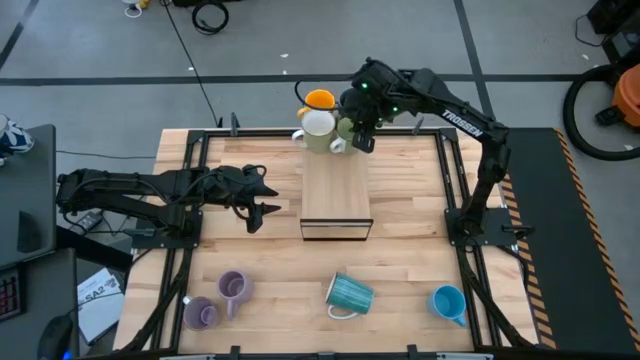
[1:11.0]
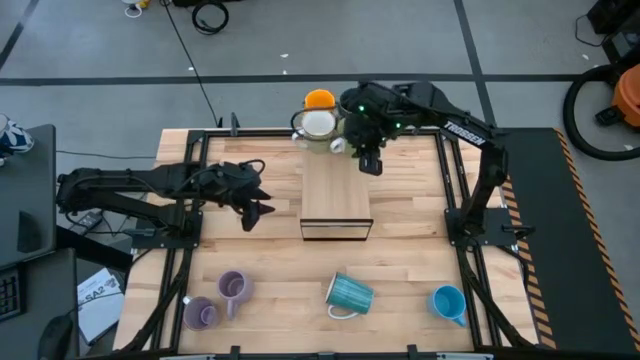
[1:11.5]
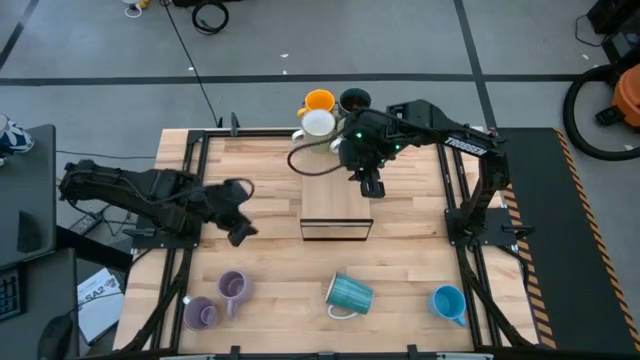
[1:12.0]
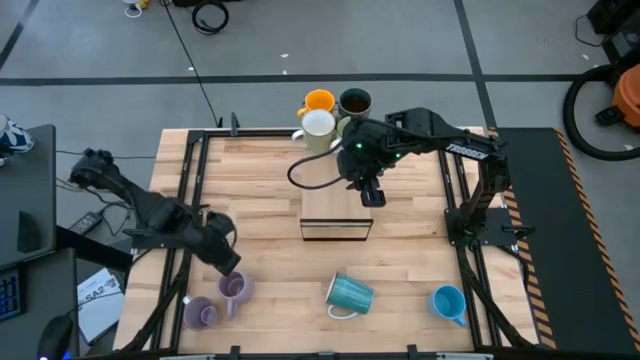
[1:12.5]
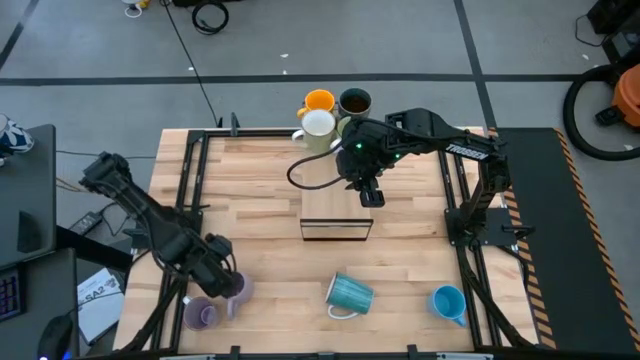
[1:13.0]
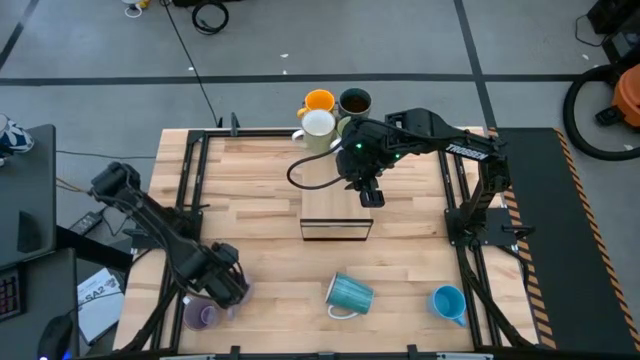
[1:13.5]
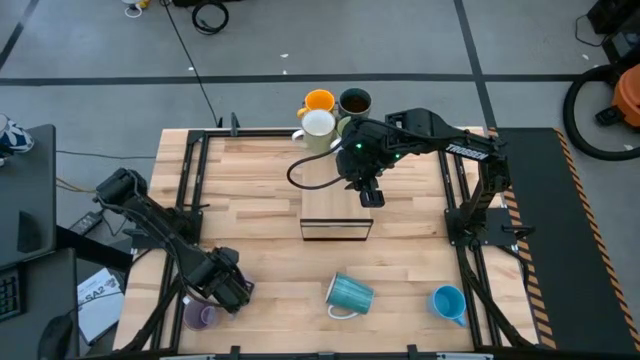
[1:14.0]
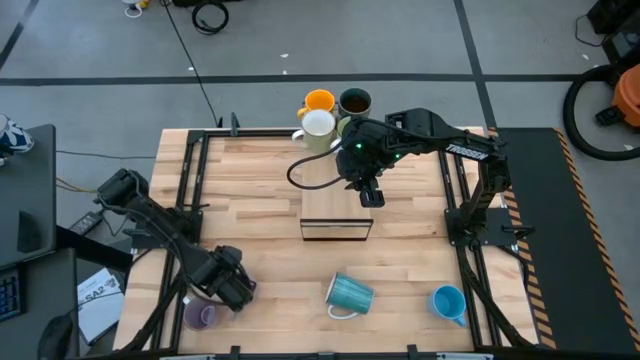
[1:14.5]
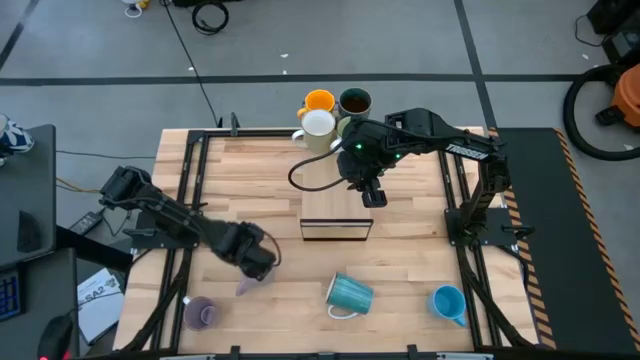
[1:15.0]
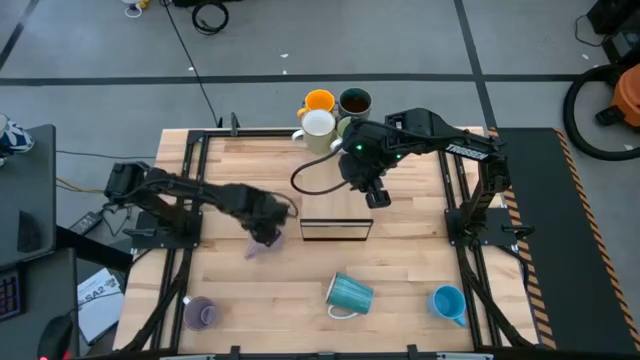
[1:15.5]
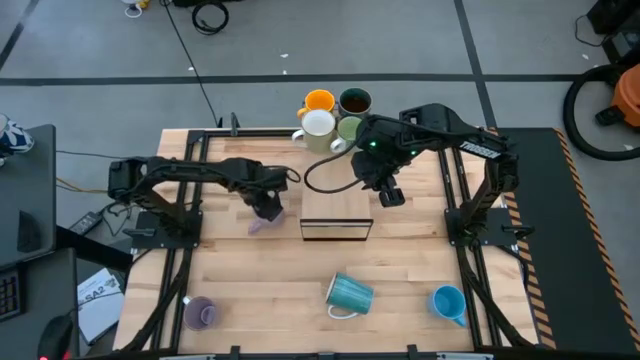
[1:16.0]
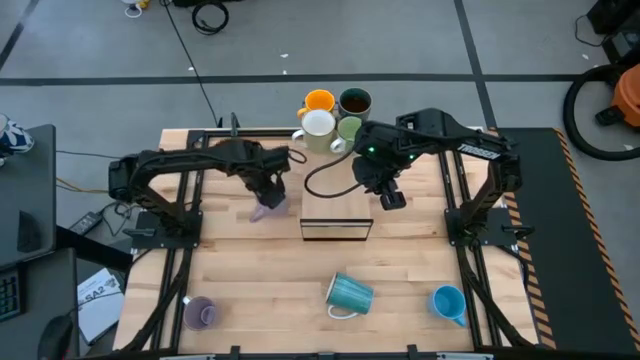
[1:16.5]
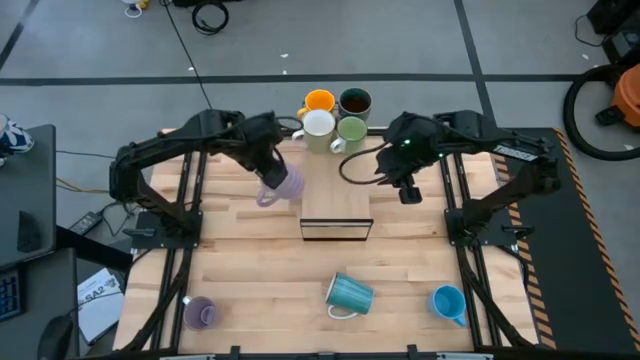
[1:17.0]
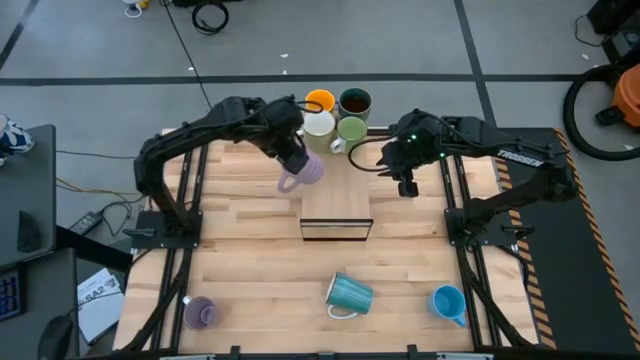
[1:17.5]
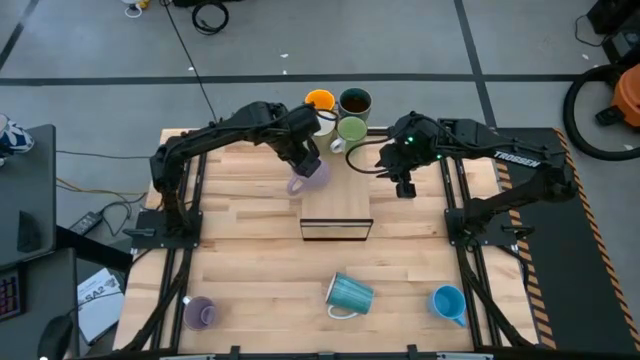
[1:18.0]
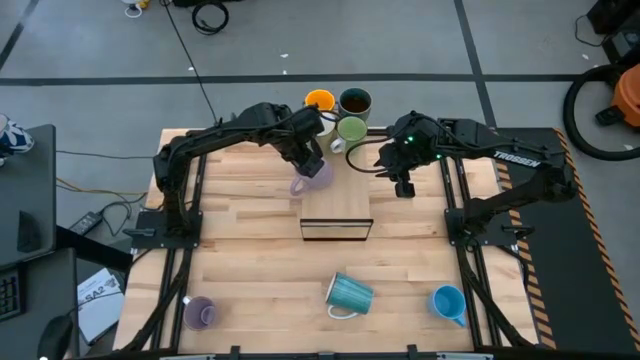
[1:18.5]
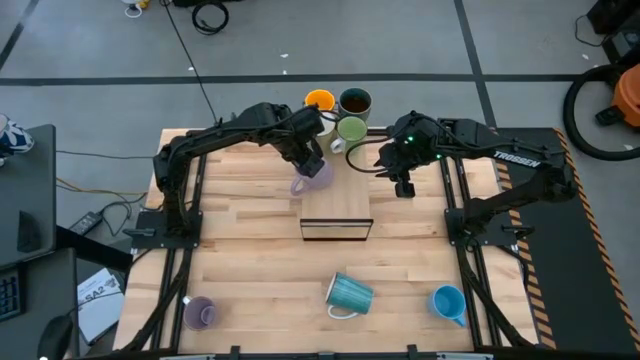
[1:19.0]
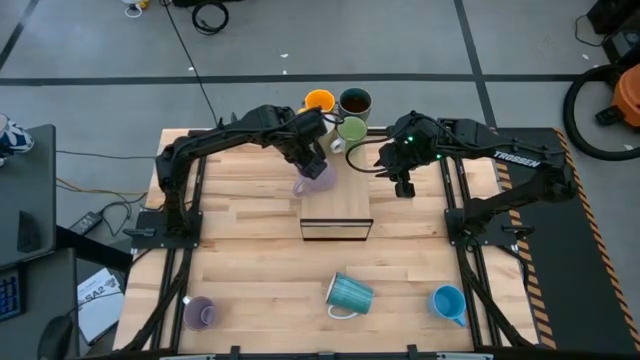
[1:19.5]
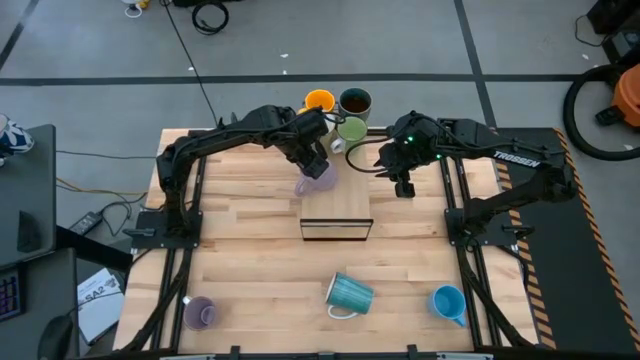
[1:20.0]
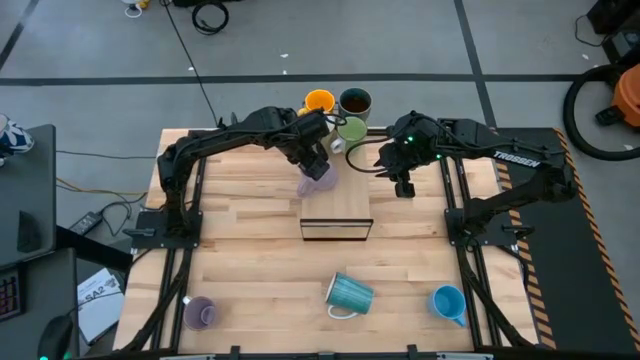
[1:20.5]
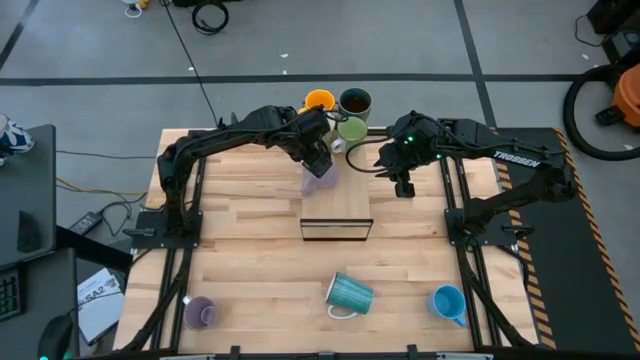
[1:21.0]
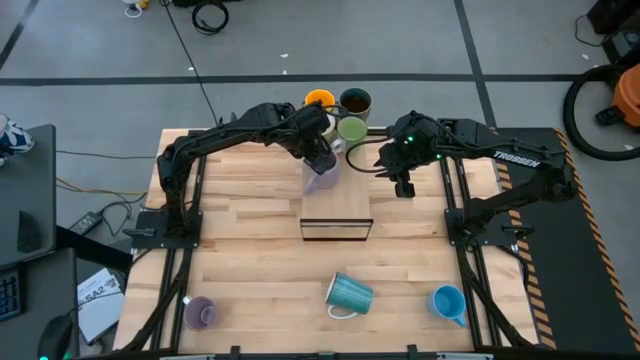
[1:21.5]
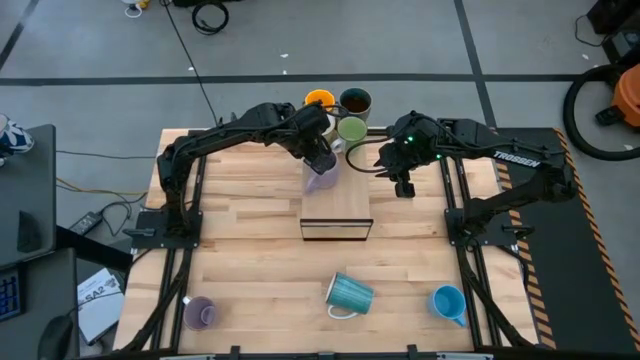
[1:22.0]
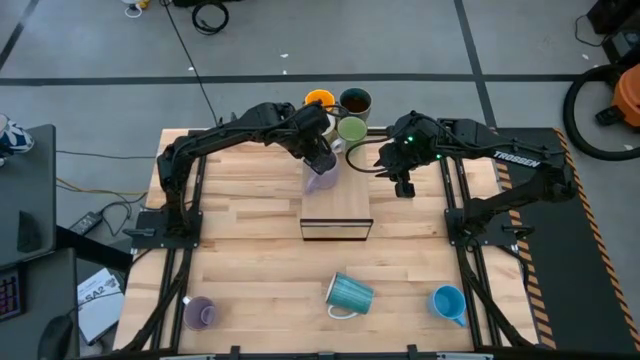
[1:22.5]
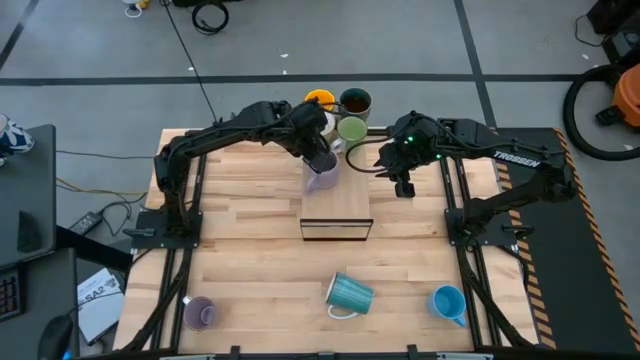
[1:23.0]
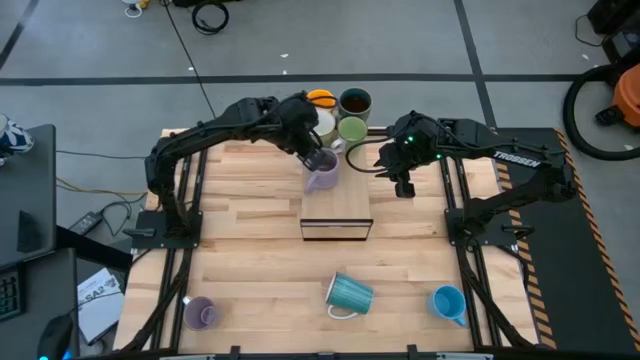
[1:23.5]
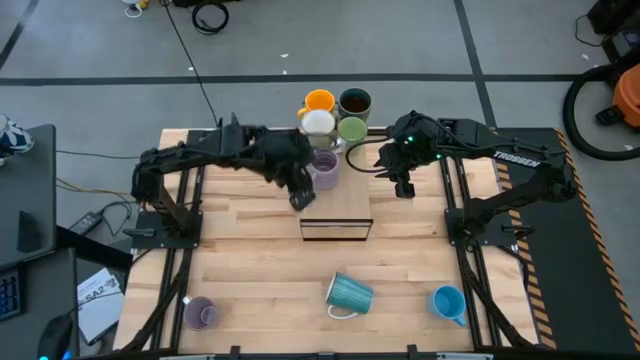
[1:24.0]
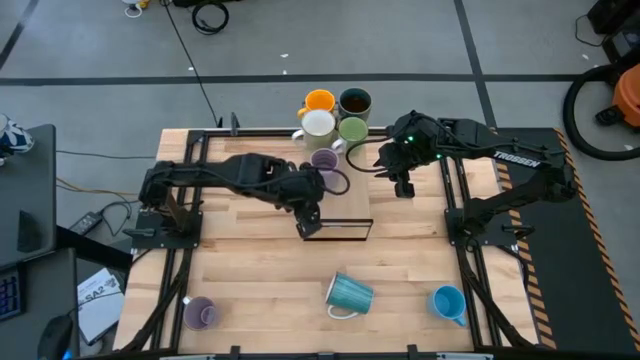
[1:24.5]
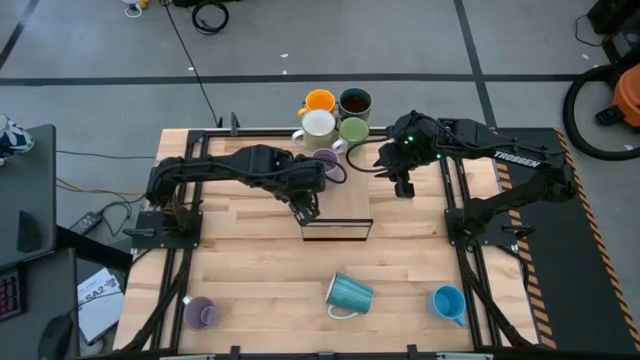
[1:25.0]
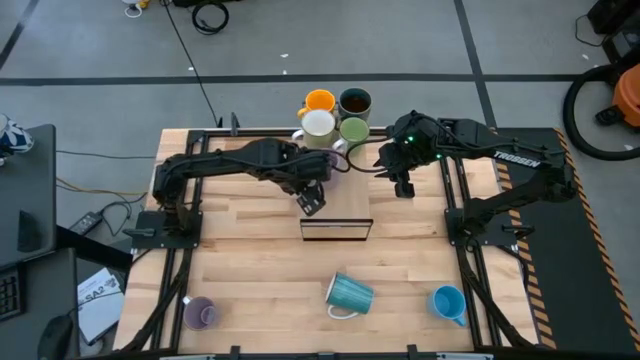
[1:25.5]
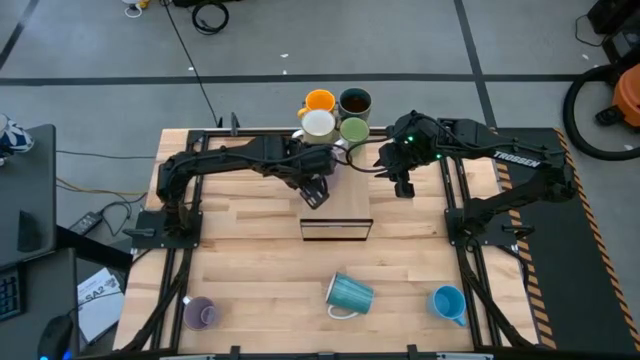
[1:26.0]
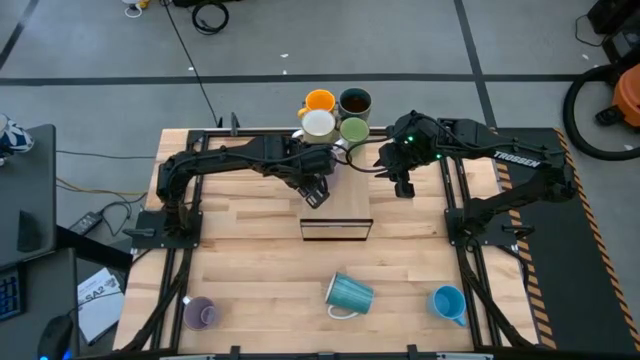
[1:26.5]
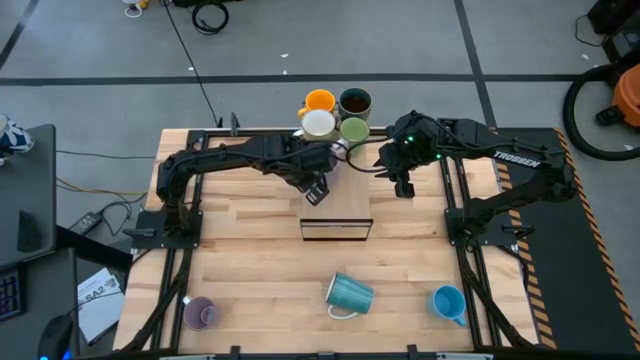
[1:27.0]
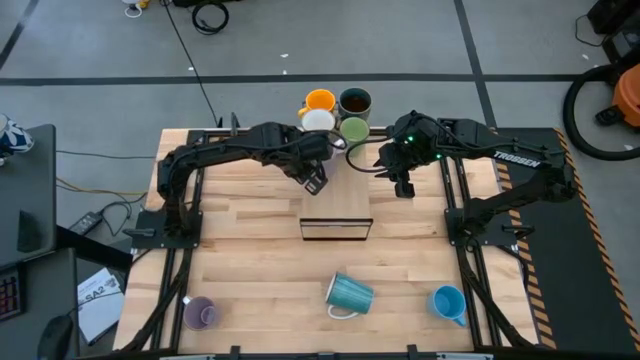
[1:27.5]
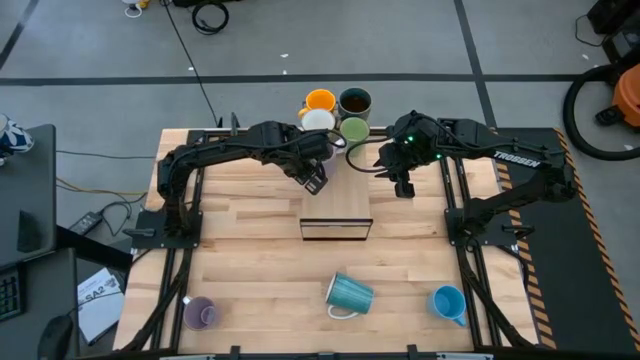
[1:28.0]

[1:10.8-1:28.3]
Task: Place coffee mugs
Put the right purple mug on the shelf
